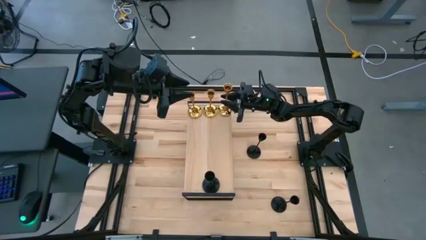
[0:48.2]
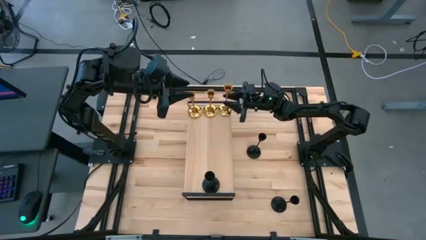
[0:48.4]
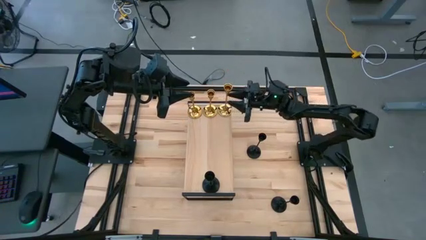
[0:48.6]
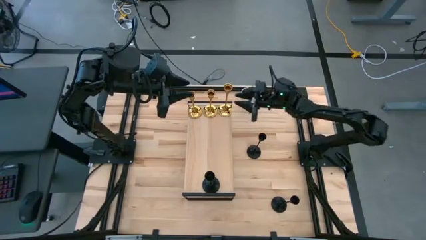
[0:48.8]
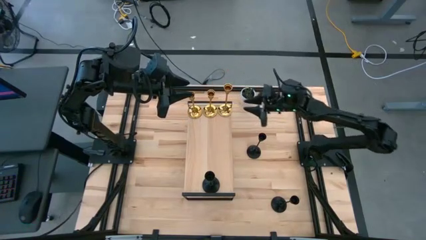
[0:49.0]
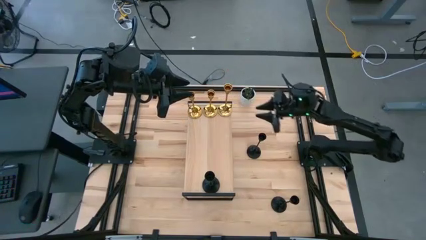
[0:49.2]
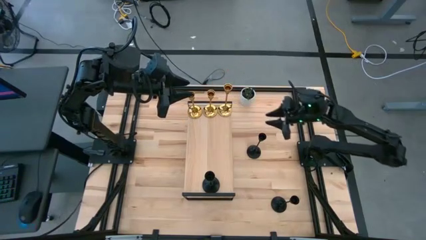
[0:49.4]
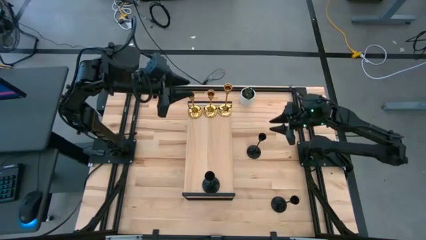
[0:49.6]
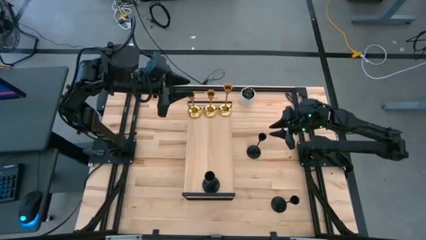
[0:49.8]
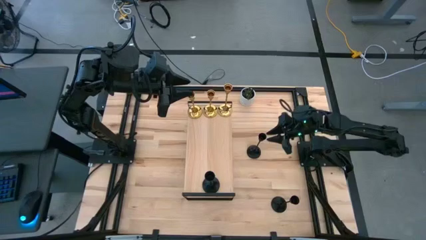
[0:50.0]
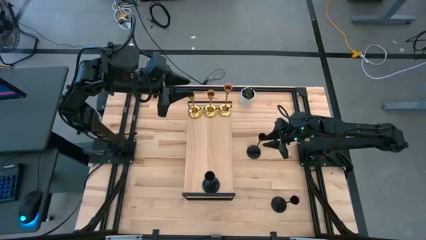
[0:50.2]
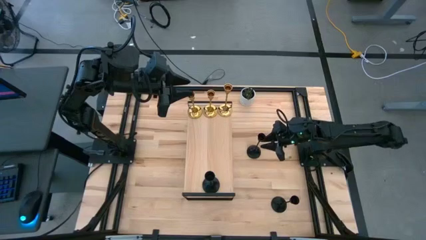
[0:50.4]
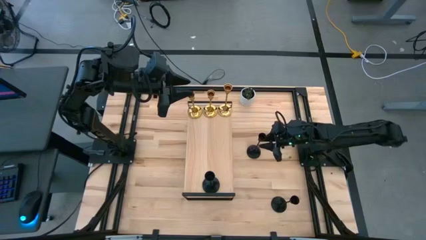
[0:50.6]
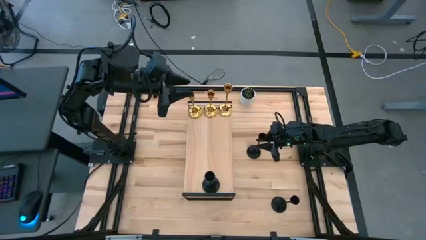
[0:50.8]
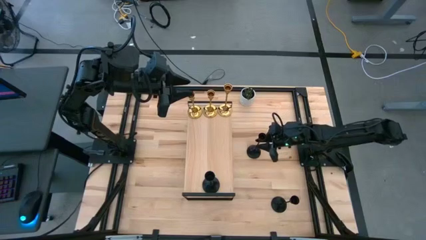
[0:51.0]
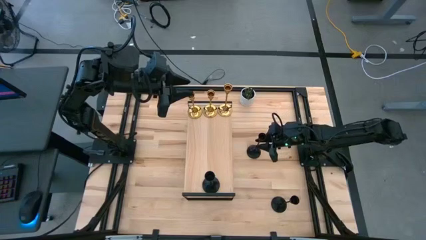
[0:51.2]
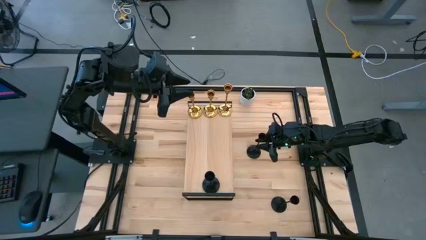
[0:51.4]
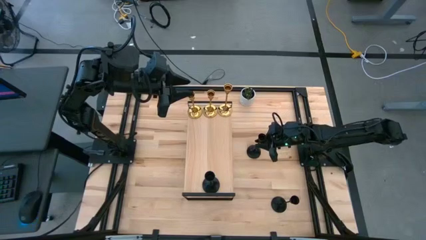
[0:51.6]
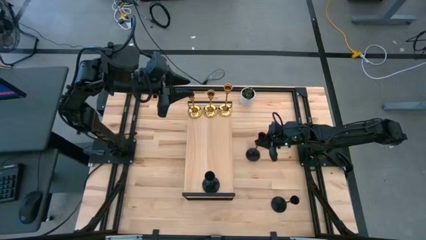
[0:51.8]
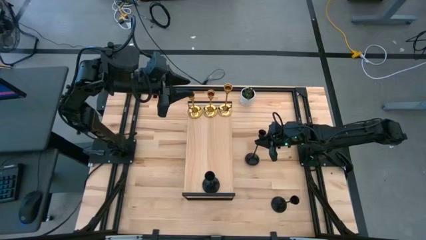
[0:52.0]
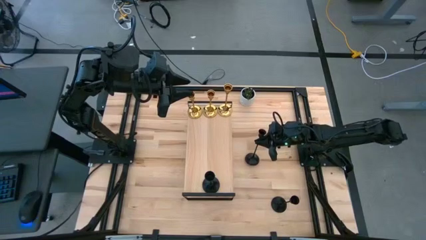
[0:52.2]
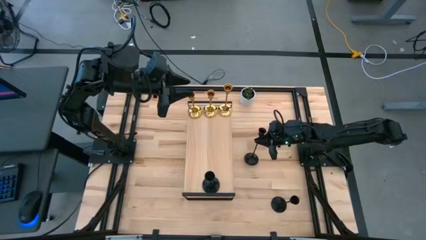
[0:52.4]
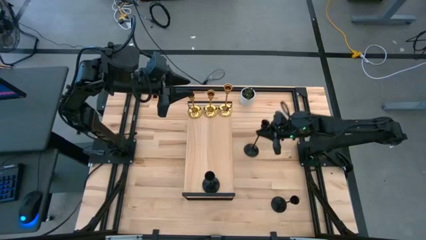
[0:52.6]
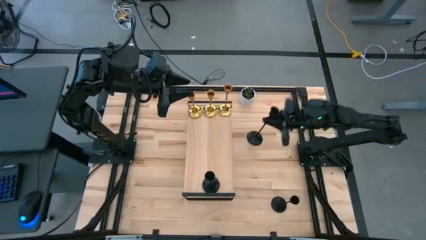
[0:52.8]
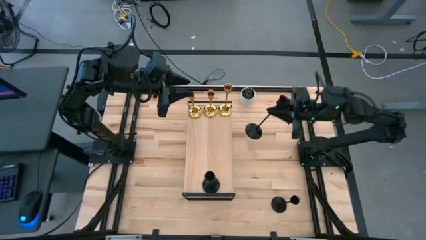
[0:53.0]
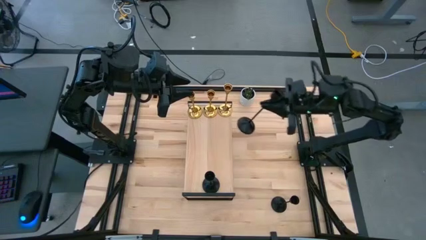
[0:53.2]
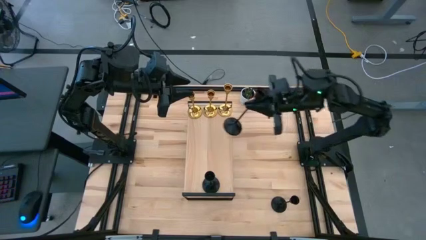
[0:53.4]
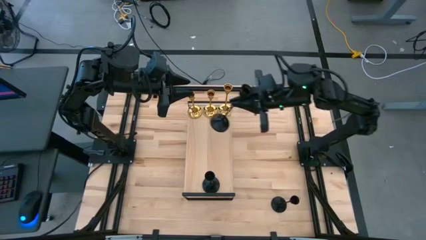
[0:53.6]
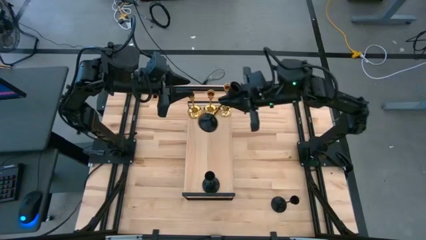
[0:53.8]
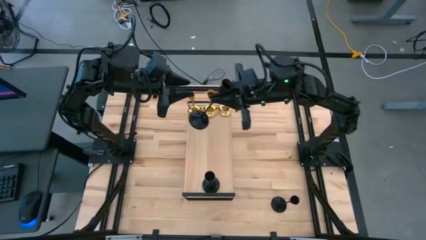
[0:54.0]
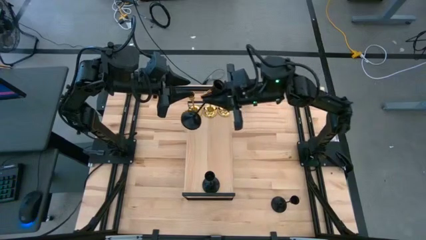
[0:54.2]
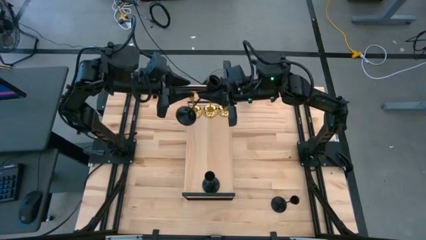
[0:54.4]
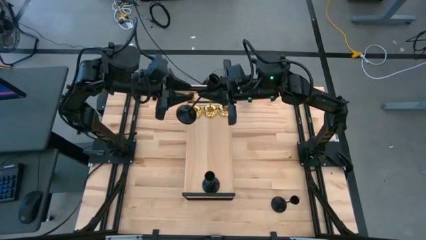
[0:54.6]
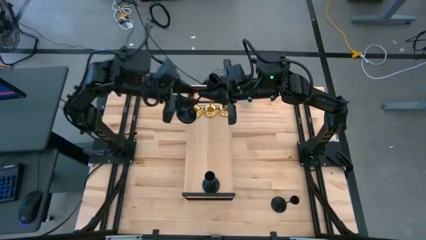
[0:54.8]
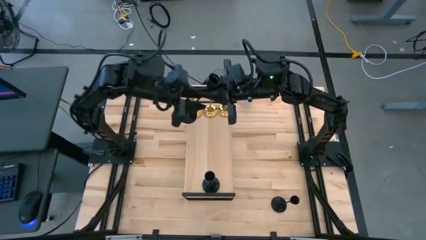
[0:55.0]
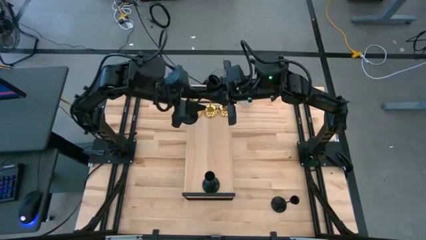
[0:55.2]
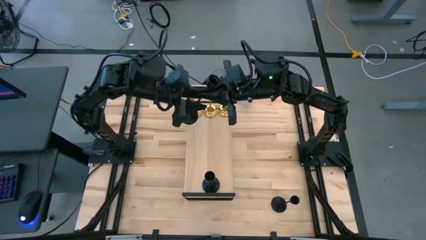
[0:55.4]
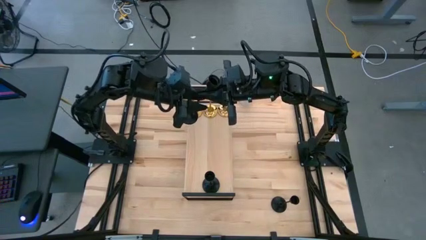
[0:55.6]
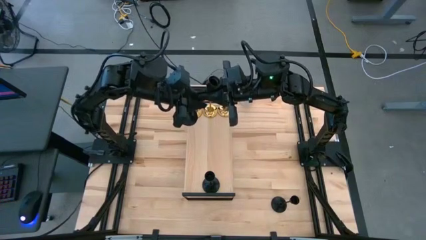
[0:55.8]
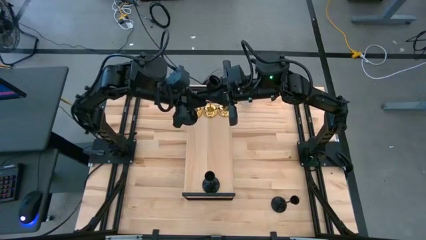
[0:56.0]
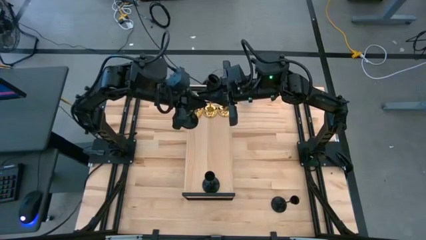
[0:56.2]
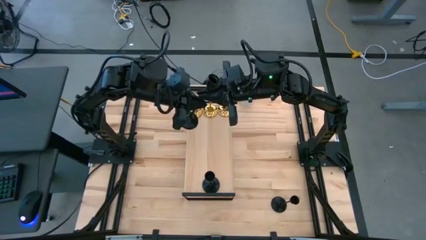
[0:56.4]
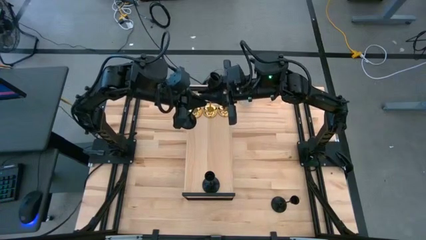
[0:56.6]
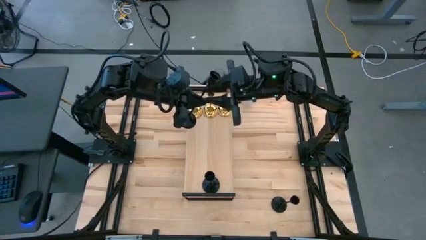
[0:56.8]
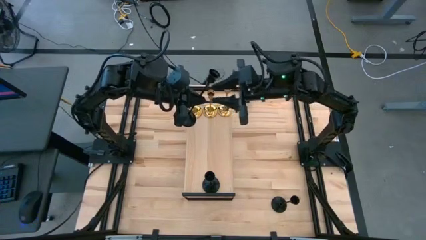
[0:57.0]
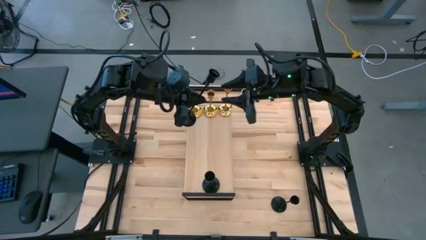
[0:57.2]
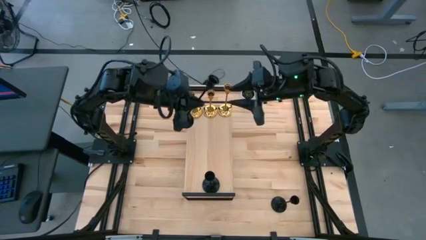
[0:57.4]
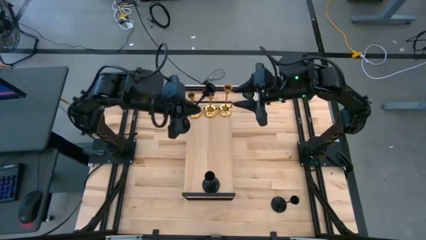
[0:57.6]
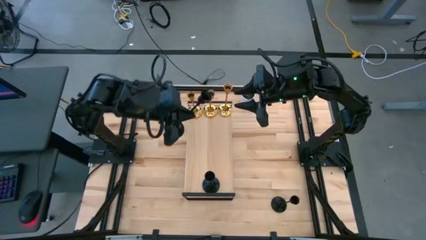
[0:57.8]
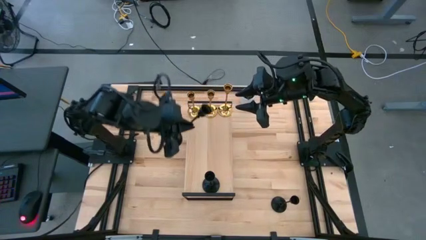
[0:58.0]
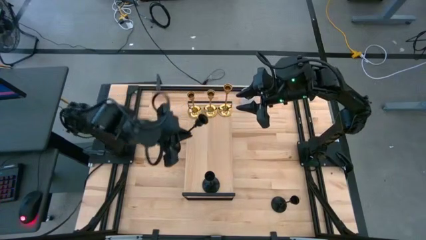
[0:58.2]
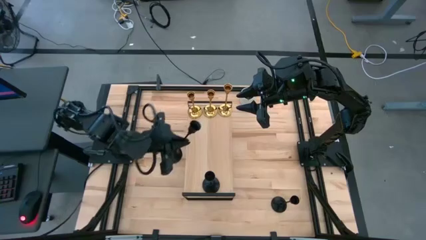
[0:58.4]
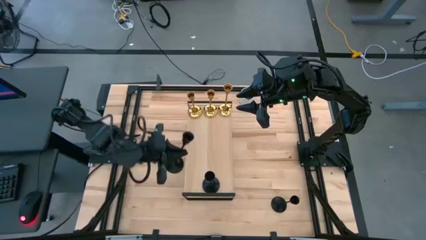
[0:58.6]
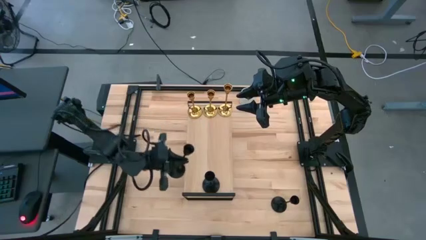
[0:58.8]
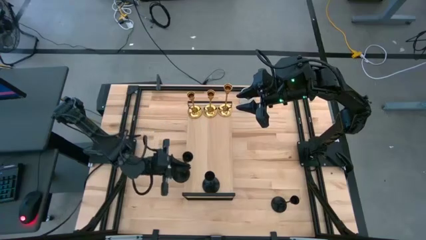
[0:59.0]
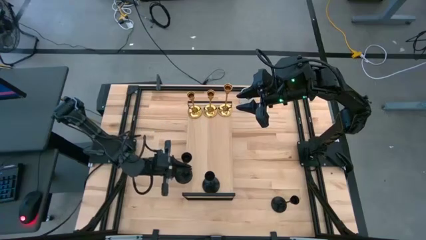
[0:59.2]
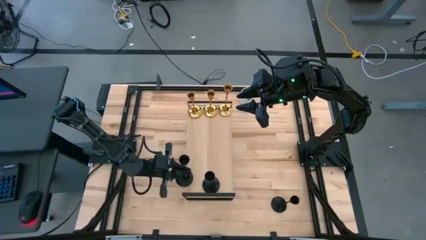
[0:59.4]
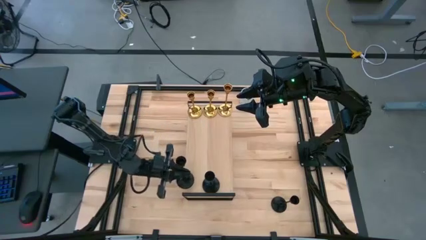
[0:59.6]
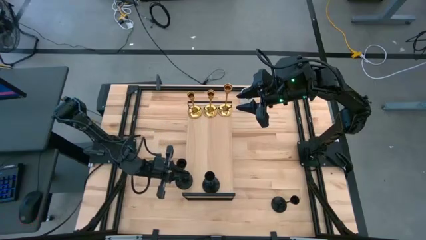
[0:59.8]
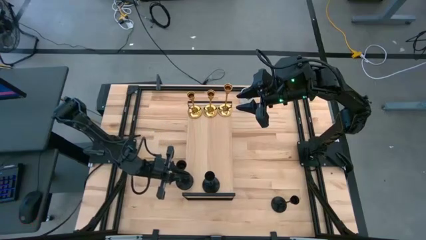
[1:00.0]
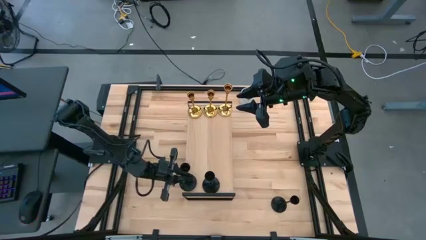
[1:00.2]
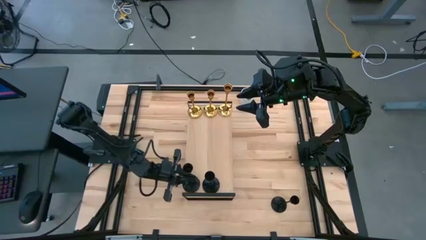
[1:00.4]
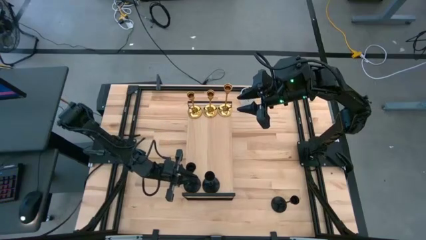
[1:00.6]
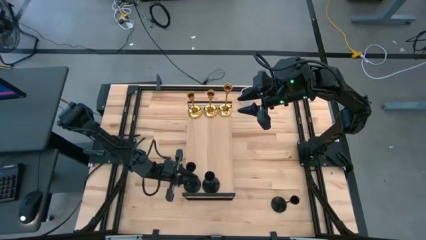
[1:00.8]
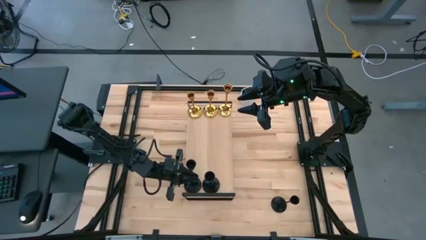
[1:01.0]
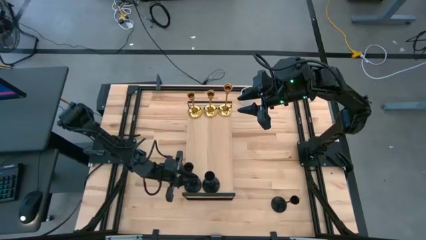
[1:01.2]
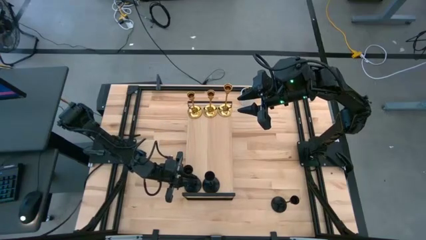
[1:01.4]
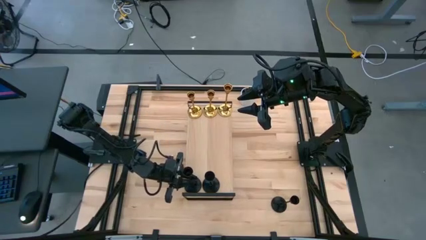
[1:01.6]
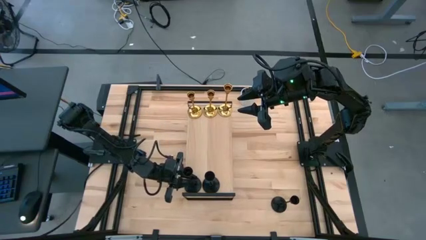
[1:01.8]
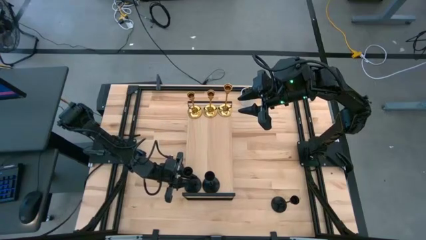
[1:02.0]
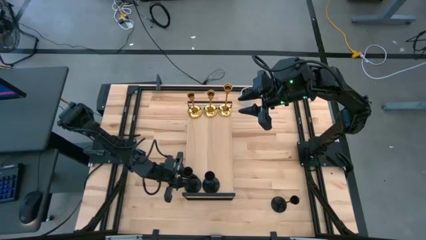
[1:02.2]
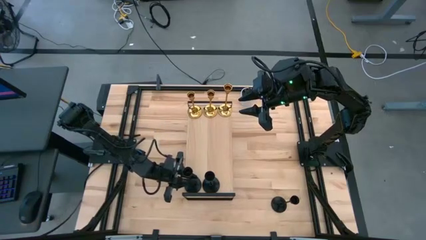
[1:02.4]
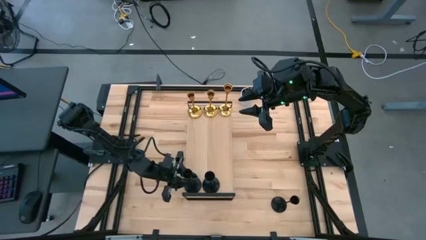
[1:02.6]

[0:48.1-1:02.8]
Task: Pick & Place candle stick holders
Put the top black candle holder on the shelf aligned with the other black candle holder
